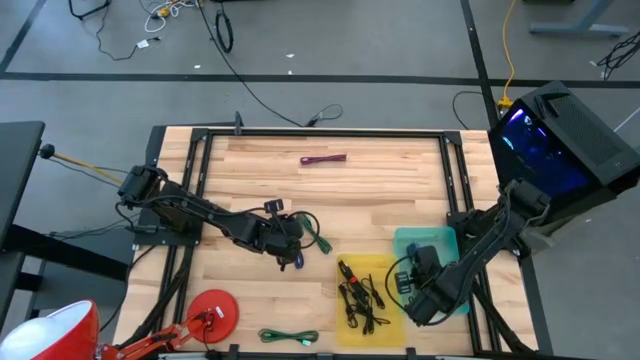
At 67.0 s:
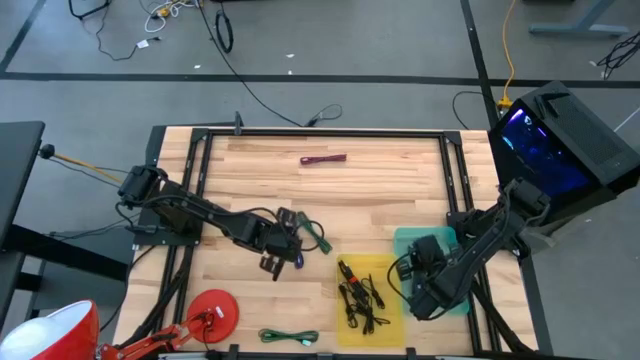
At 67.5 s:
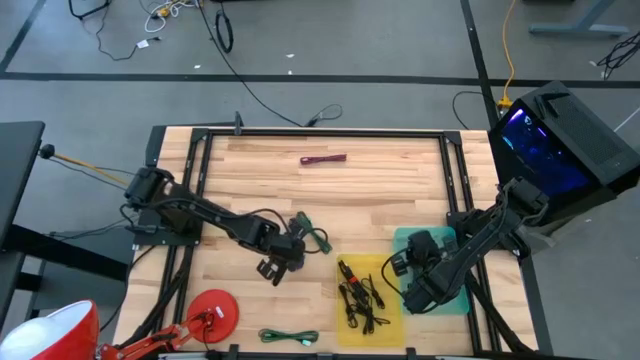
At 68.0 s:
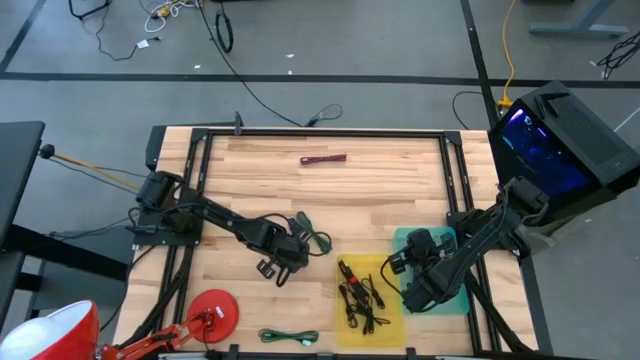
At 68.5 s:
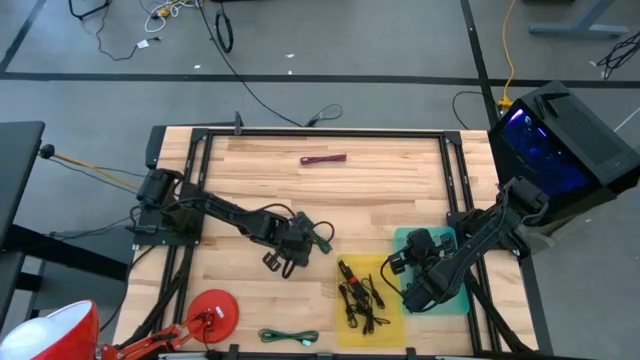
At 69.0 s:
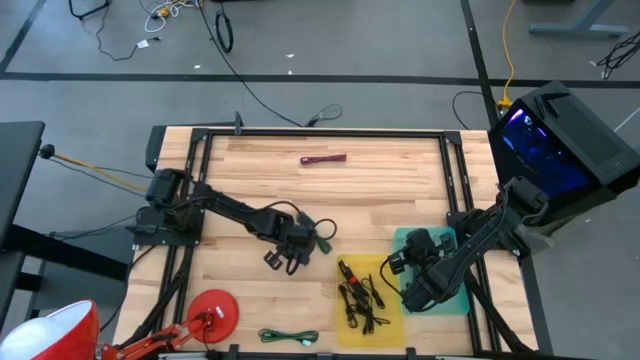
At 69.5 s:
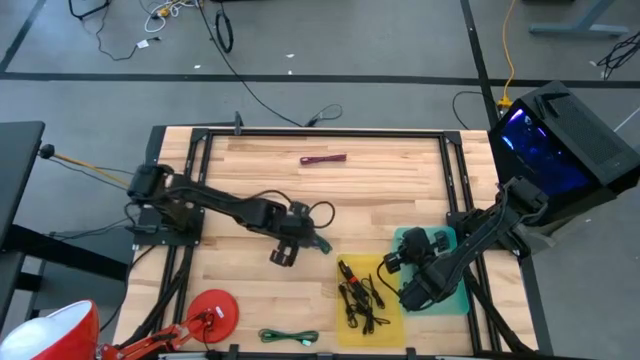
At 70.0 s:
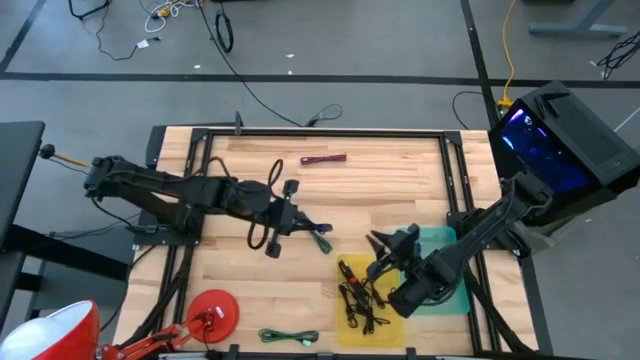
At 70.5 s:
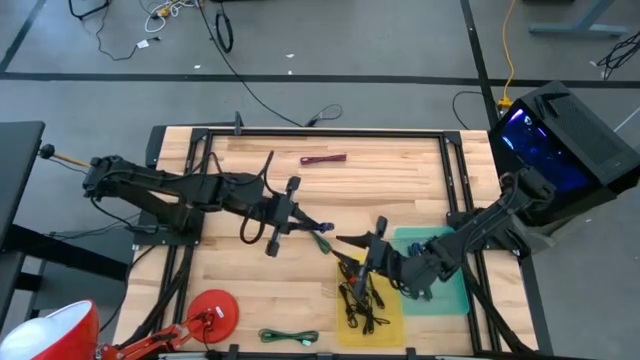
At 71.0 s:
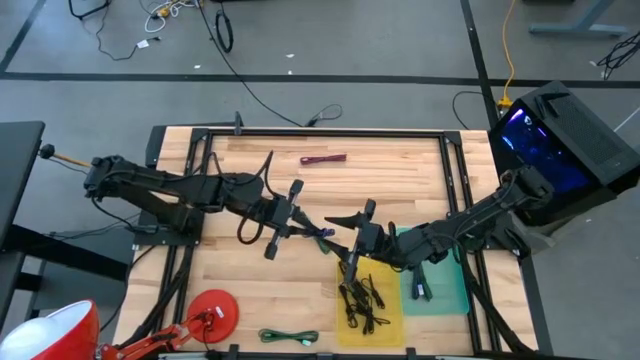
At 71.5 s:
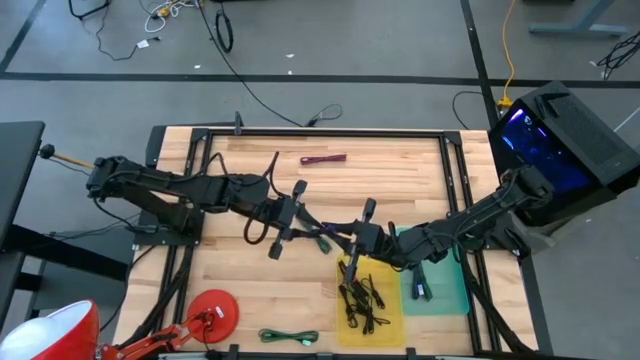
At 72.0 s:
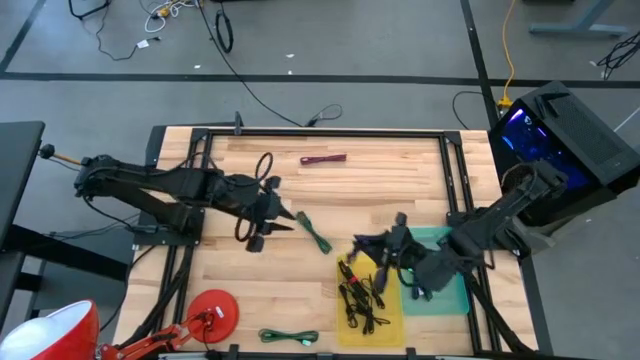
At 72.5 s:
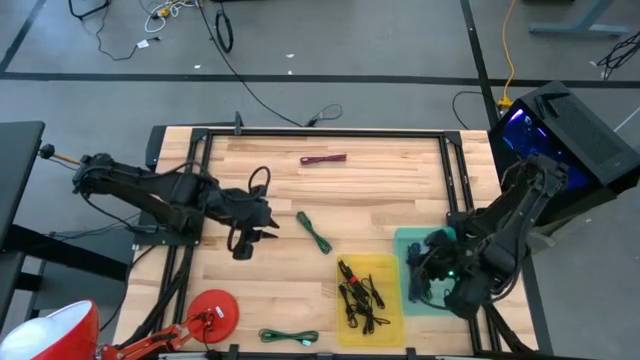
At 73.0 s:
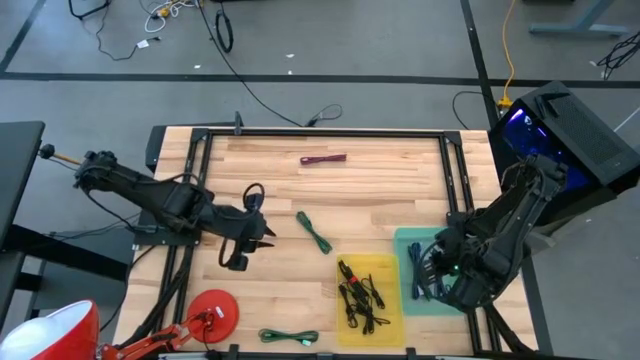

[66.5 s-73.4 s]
Task: Pick & Place USB Port
Put the blue pattern charger cable into the blue bin

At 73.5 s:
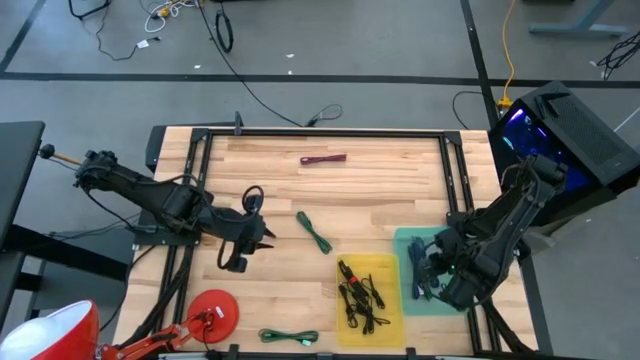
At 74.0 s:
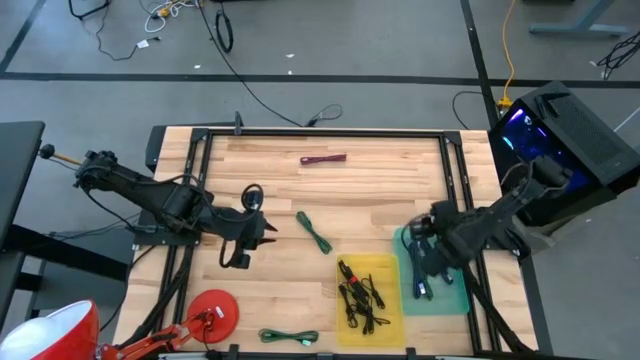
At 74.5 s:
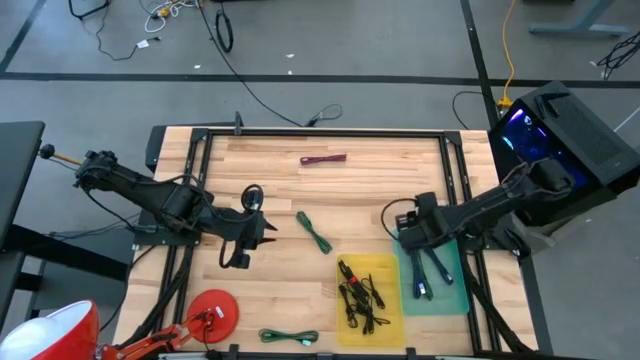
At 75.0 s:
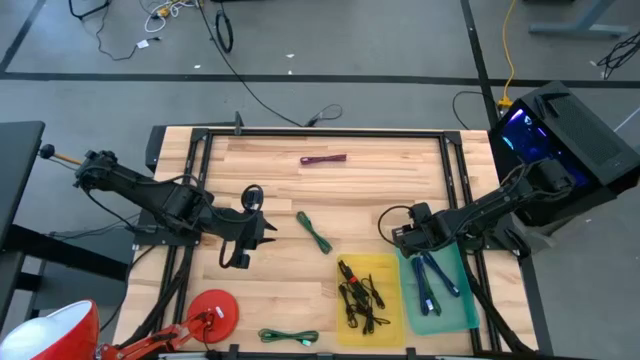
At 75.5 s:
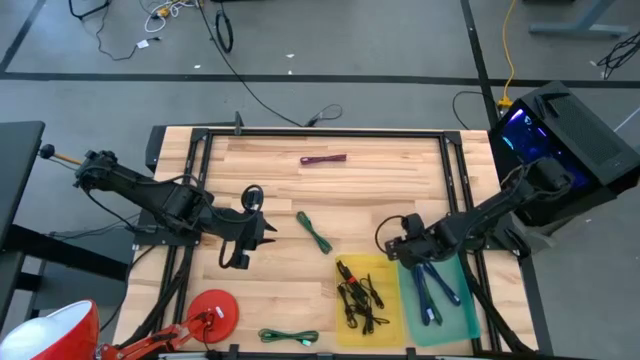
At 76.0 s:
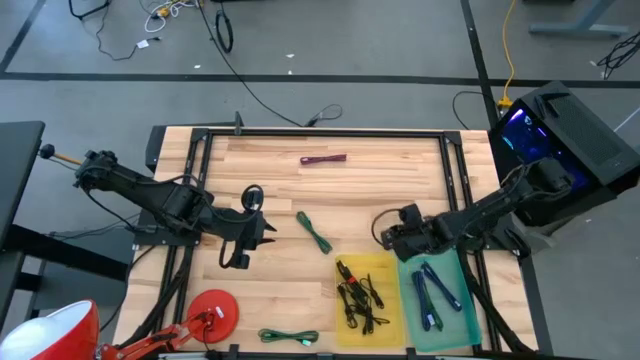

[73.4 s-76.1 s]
Adjust the blue bin

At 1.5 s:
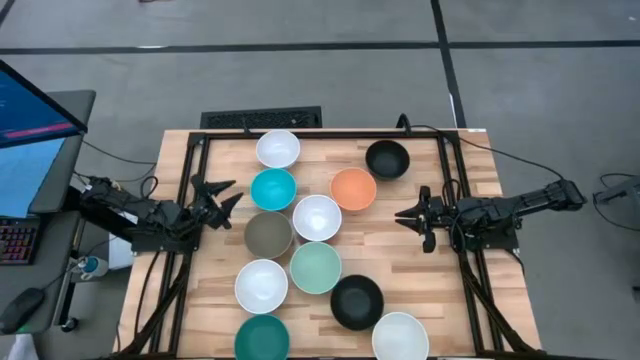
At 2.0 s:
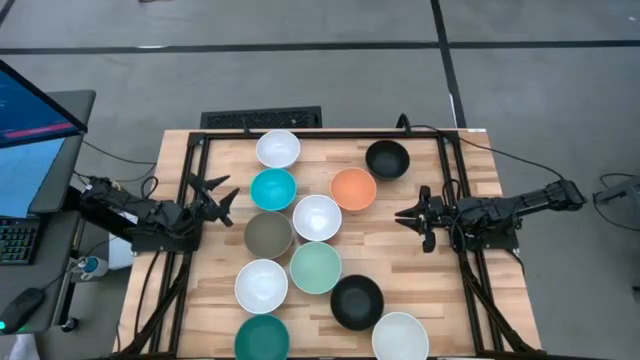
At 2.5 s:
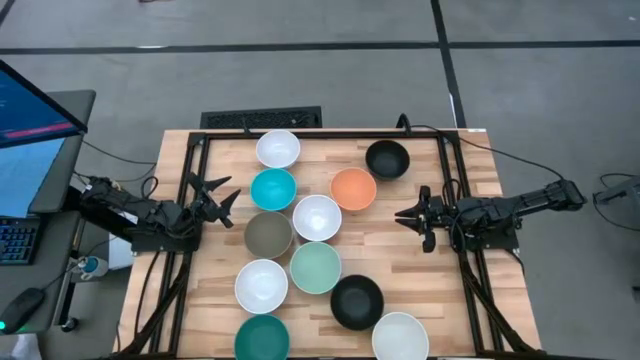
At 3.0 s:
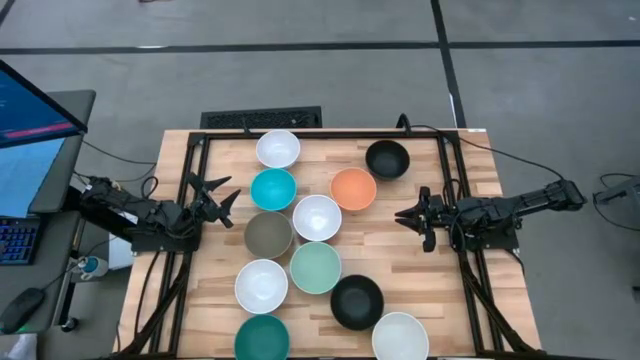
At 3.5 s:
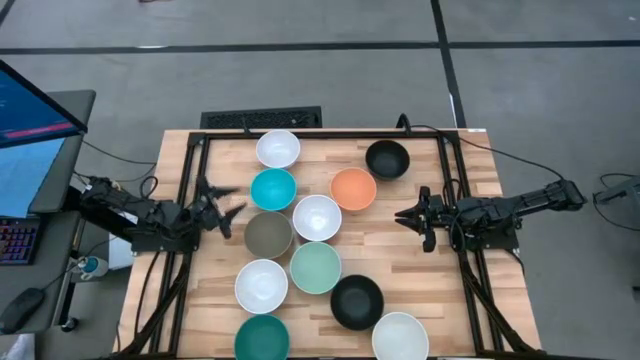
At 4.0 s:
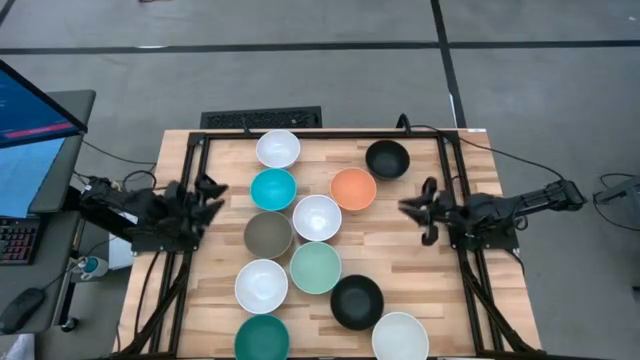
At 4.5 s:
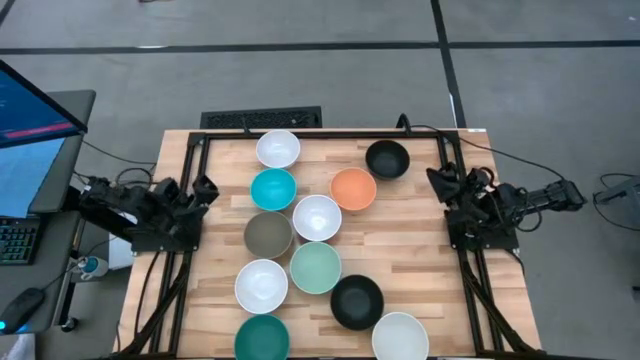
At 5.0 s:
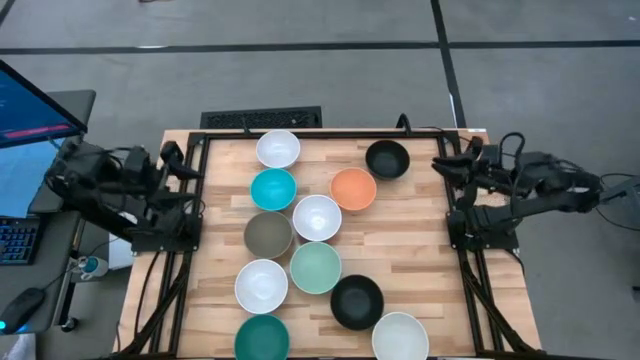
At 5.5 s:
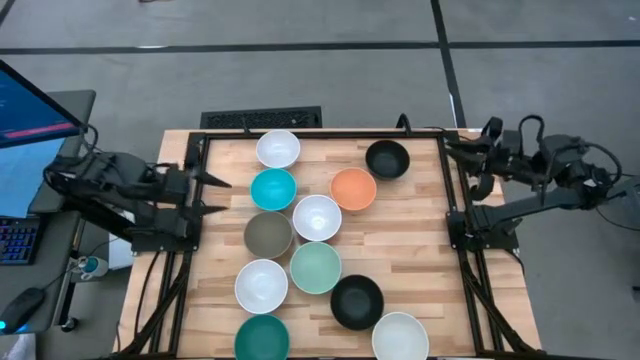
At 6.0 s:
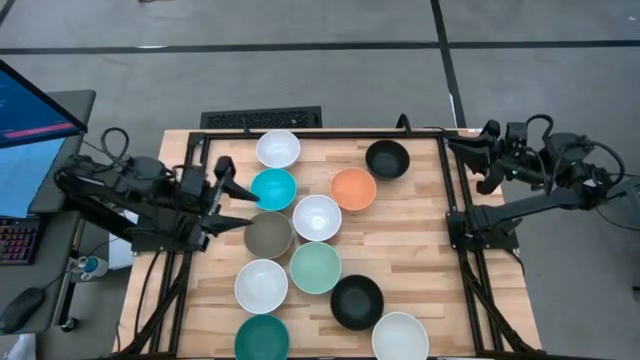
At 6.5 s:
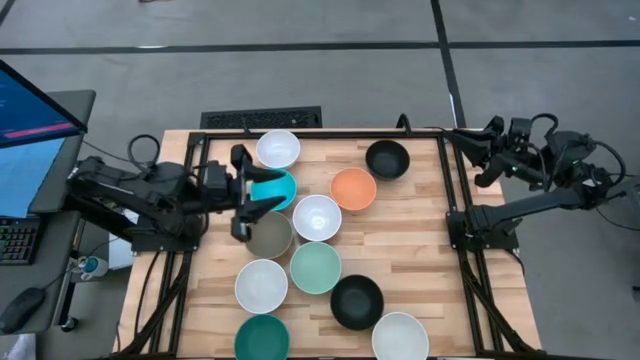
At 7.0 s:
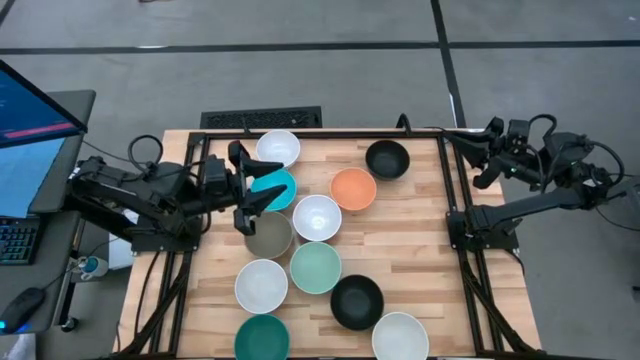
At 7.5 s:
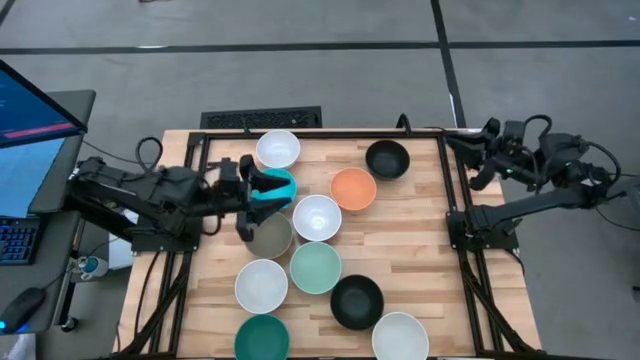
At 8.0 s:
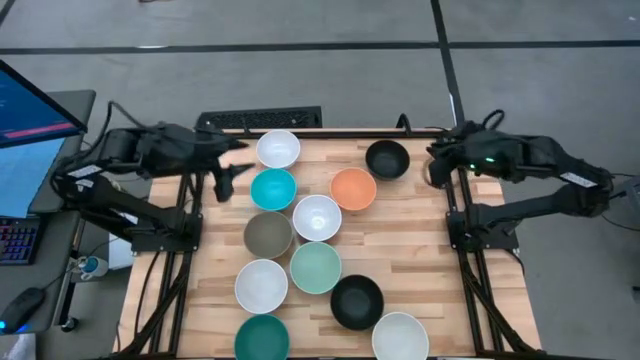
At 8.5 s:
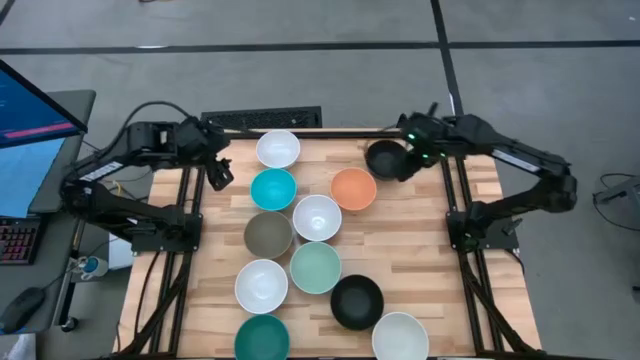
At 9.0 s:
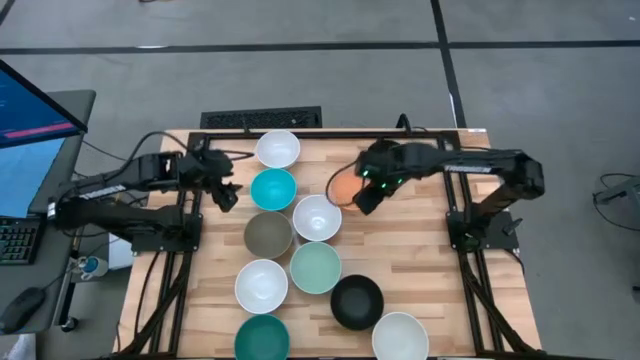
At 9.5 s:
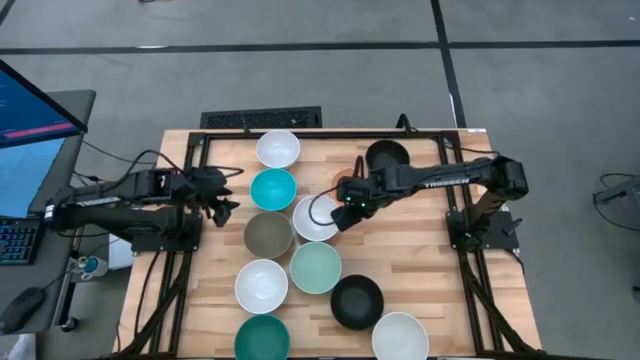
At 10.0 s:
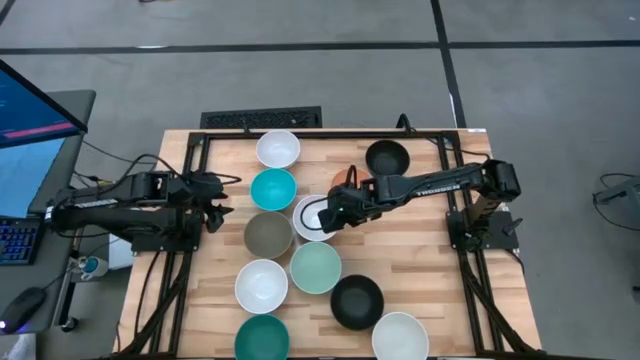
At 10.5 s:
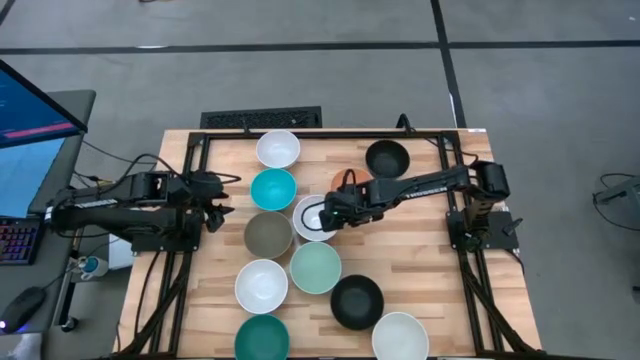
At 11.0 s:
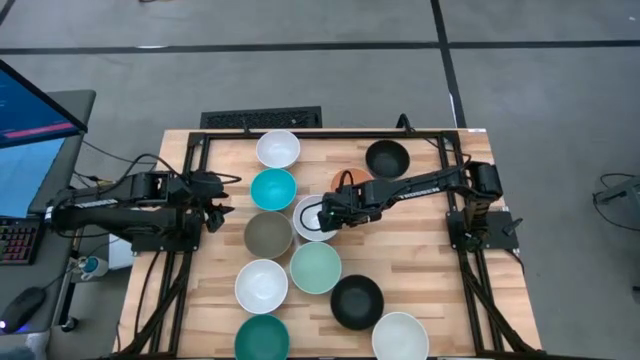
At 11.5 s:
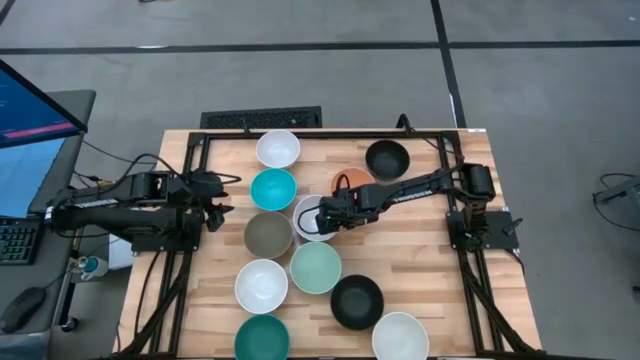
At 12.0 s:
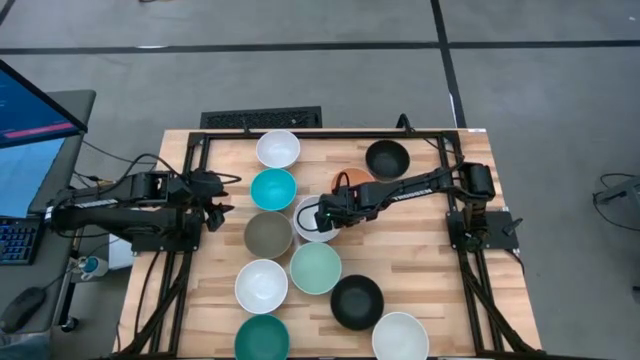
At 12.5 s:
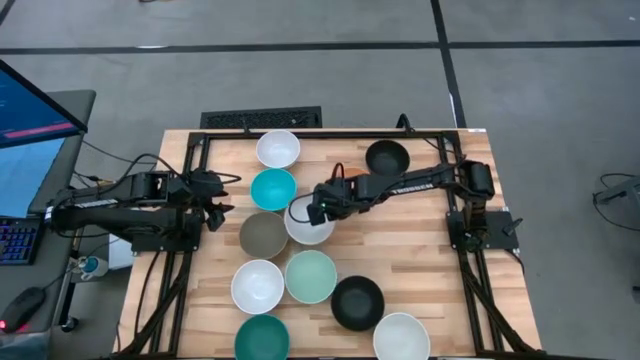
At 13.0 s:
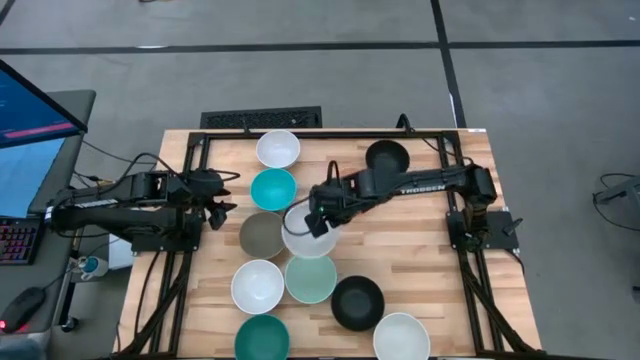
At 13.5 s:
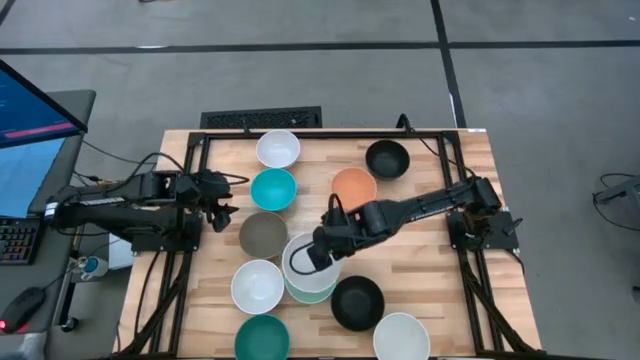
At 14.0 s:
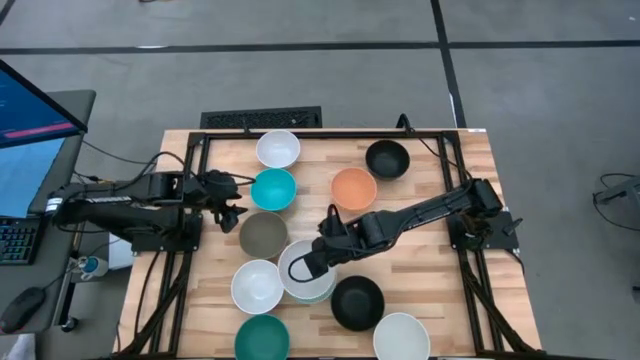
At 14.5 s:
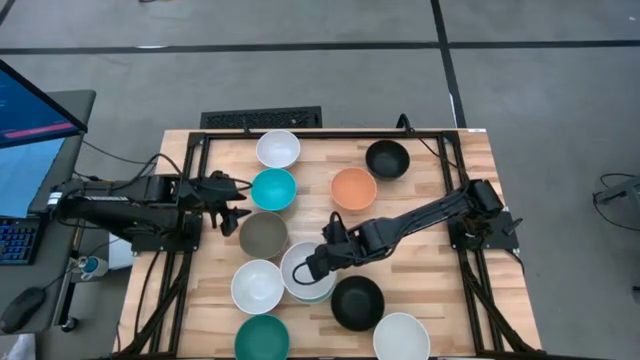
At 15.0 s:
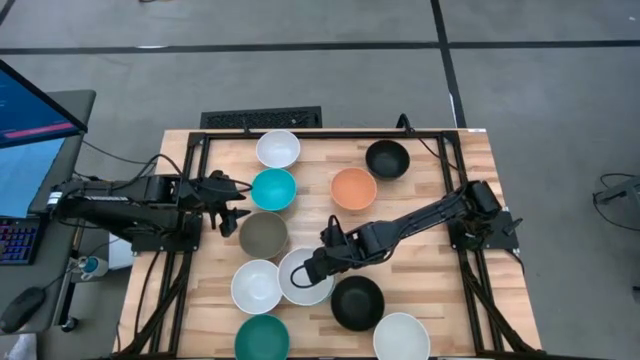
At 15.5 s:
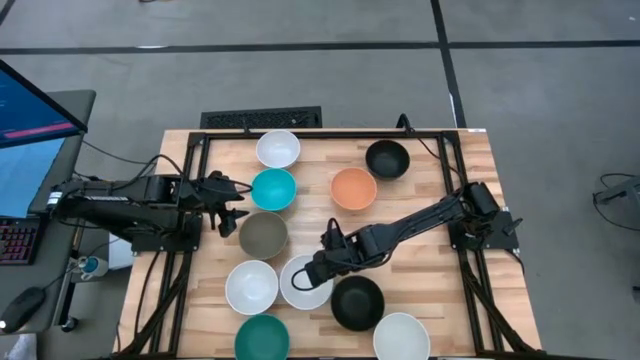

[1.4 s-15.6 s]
Task: Nest bowls inside each other
Stack the white bowl on the light green bowl
